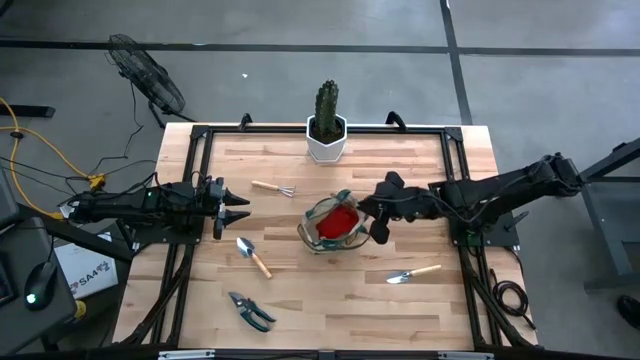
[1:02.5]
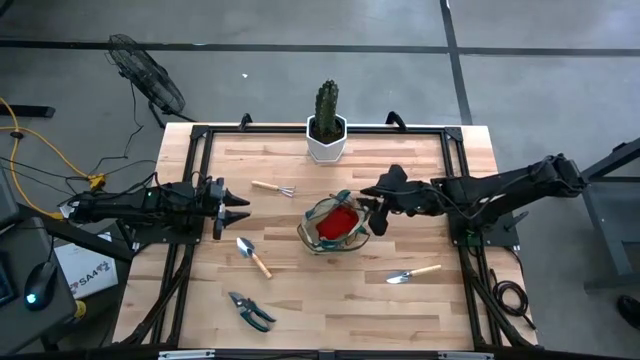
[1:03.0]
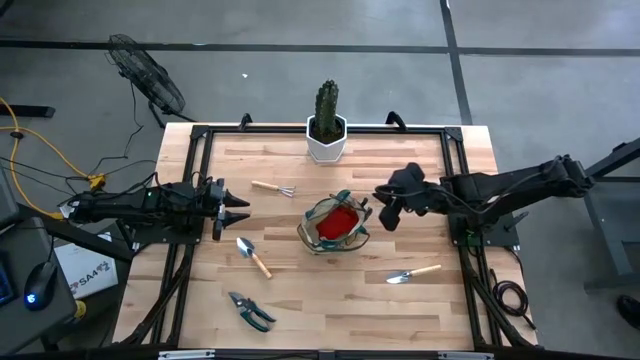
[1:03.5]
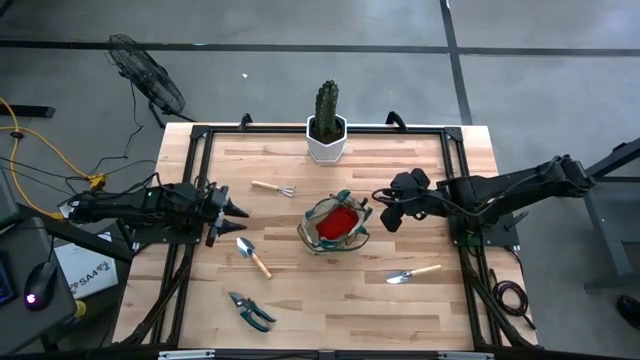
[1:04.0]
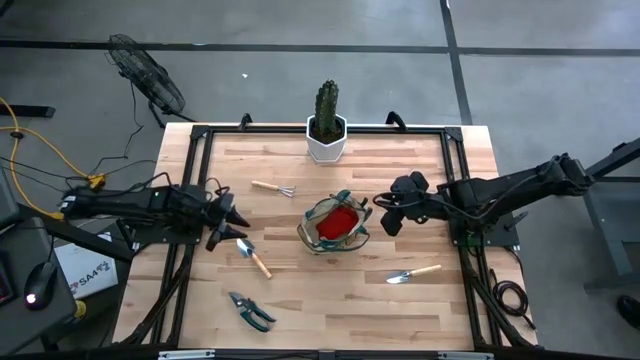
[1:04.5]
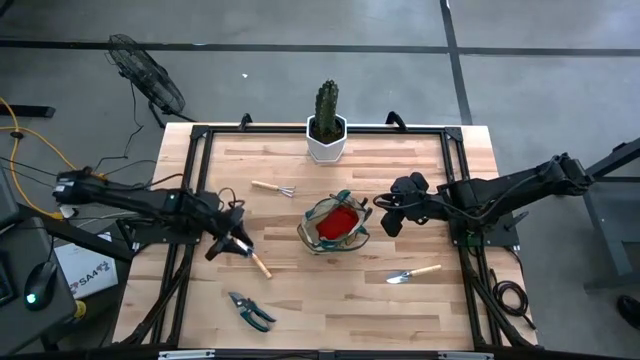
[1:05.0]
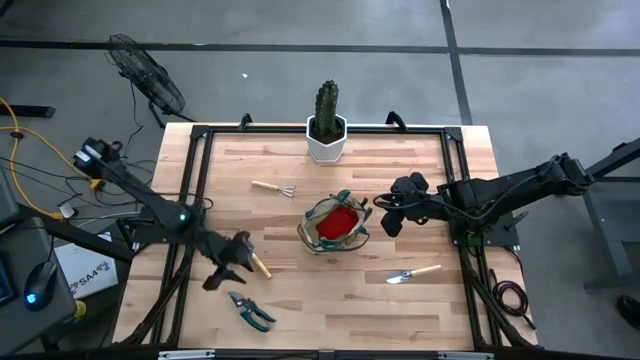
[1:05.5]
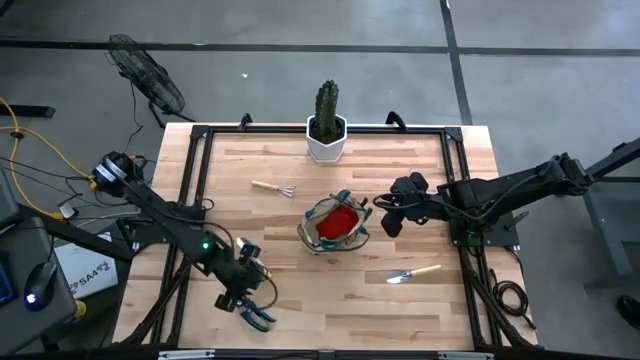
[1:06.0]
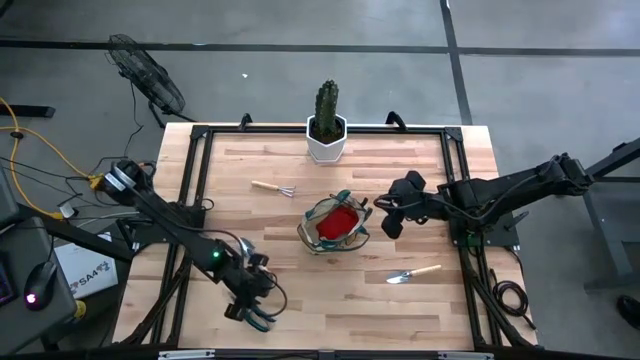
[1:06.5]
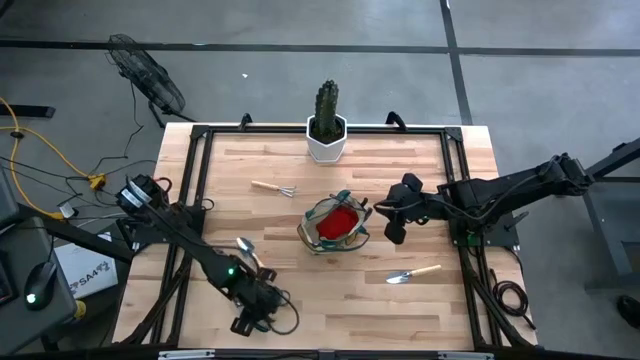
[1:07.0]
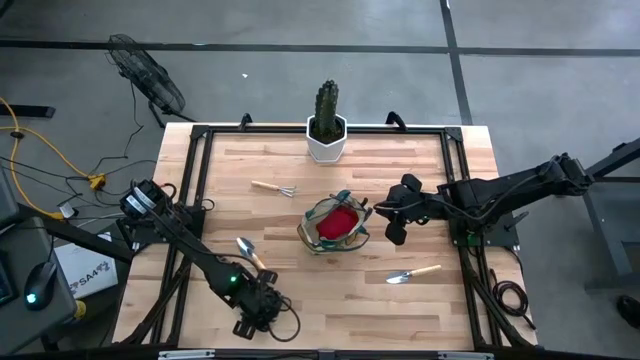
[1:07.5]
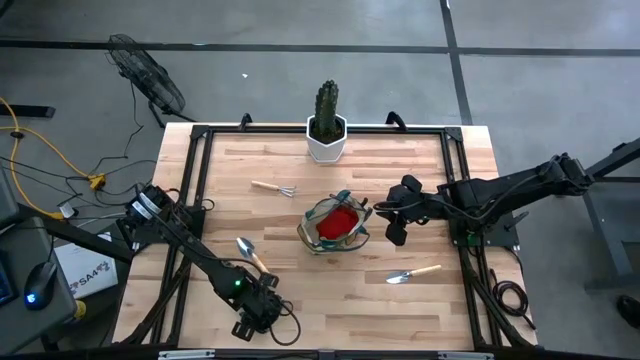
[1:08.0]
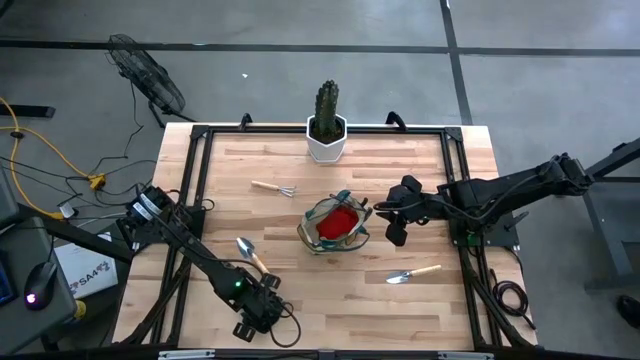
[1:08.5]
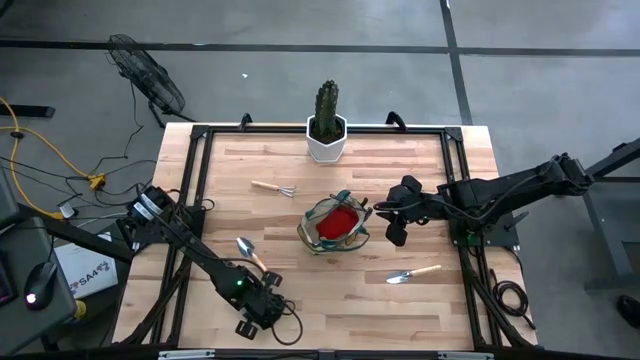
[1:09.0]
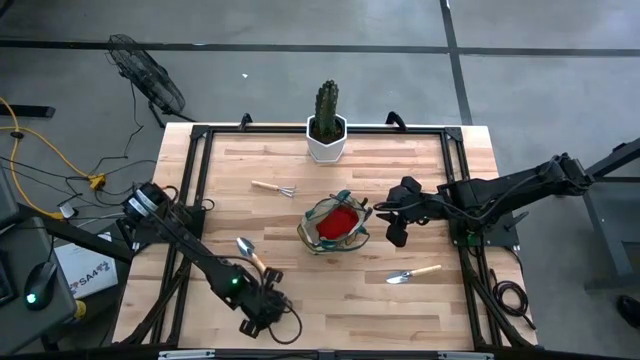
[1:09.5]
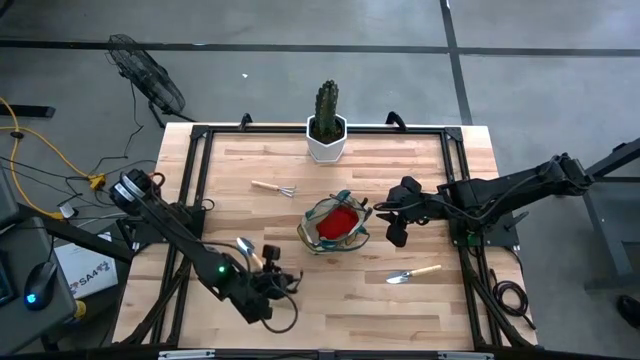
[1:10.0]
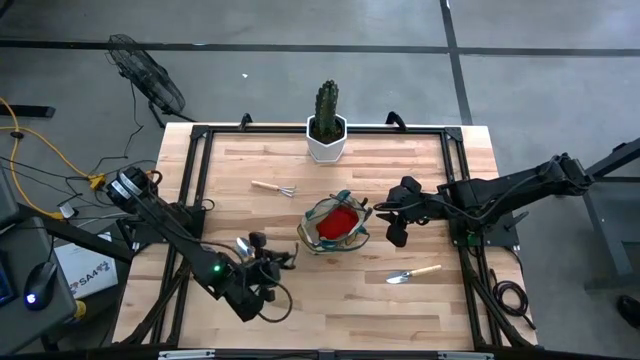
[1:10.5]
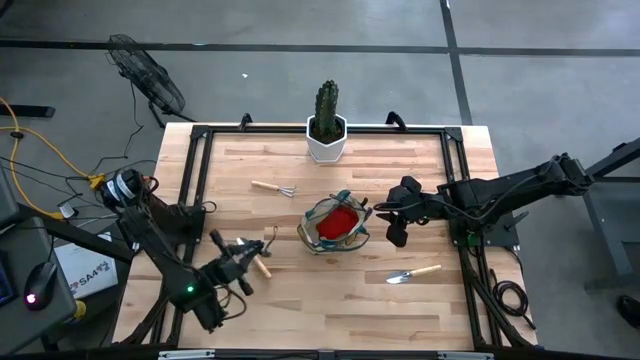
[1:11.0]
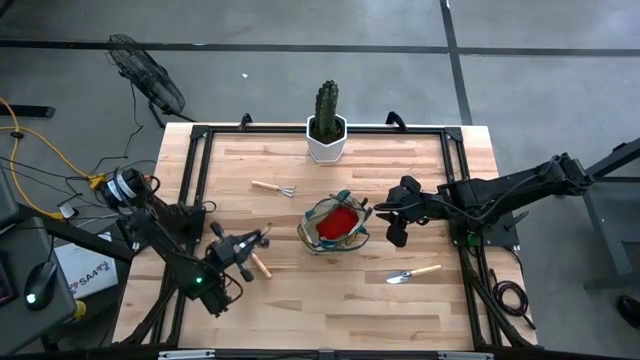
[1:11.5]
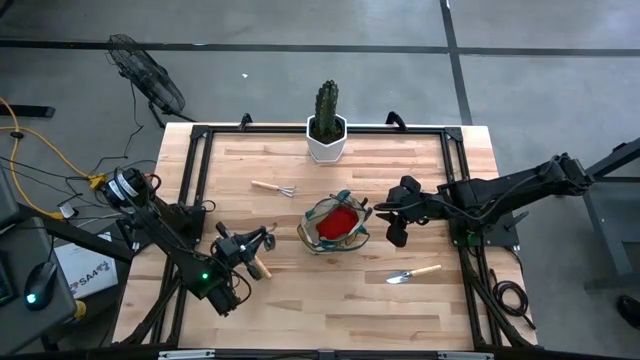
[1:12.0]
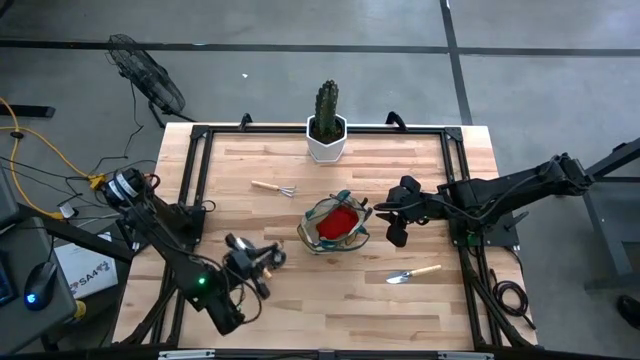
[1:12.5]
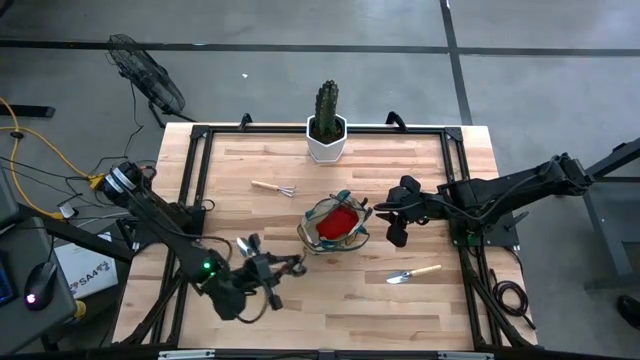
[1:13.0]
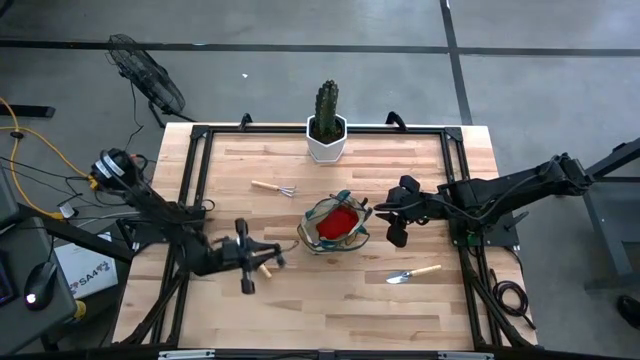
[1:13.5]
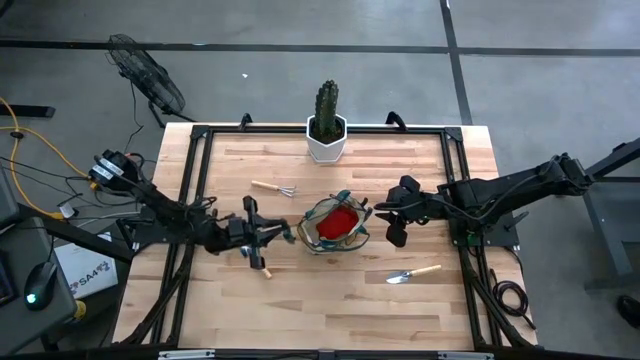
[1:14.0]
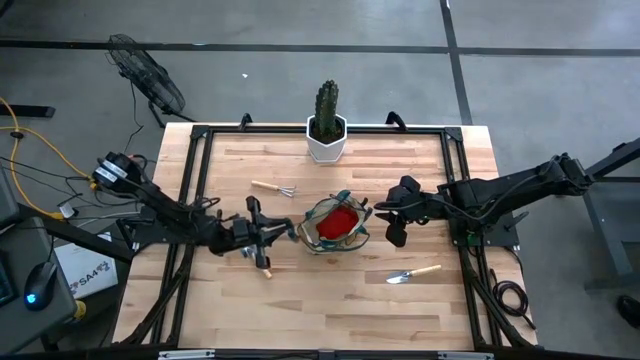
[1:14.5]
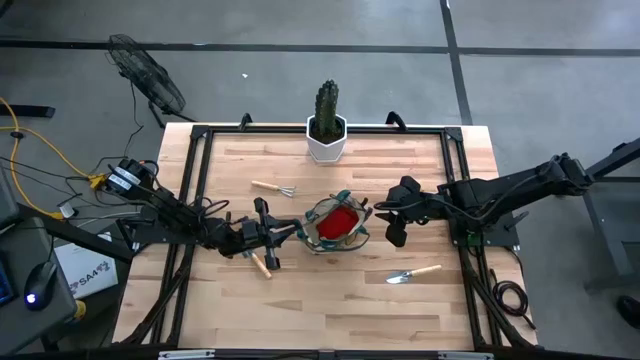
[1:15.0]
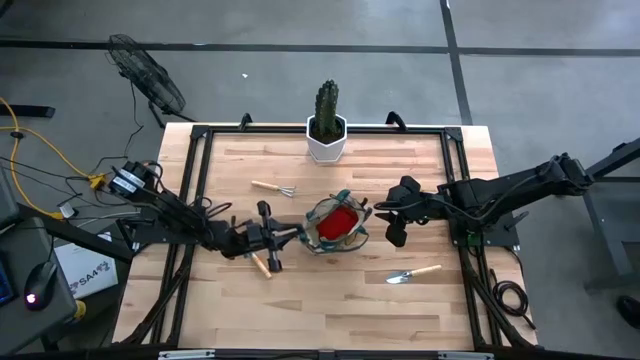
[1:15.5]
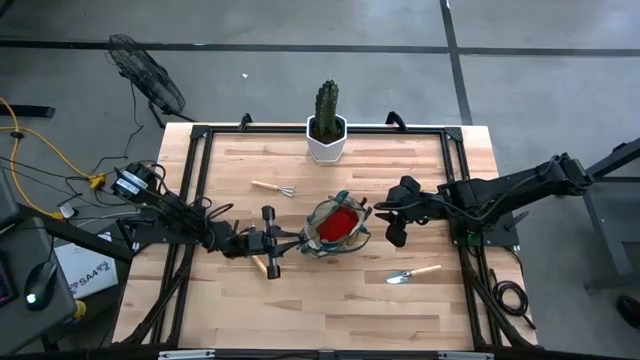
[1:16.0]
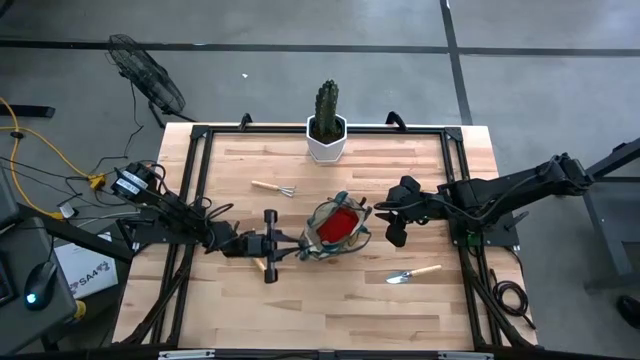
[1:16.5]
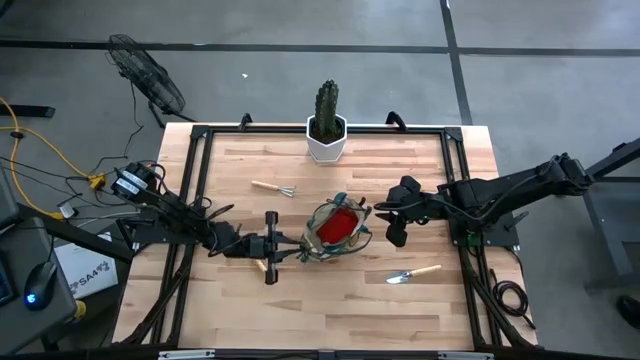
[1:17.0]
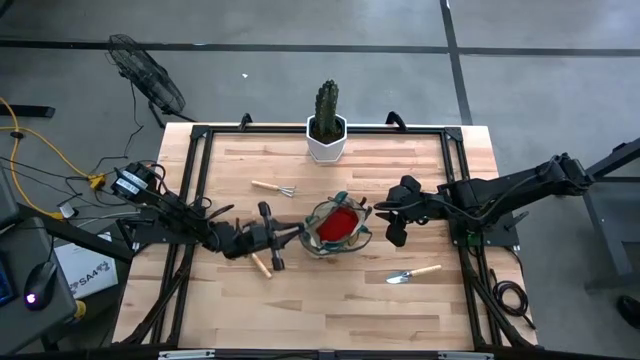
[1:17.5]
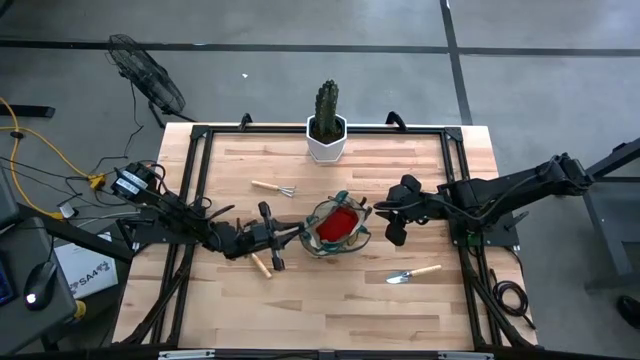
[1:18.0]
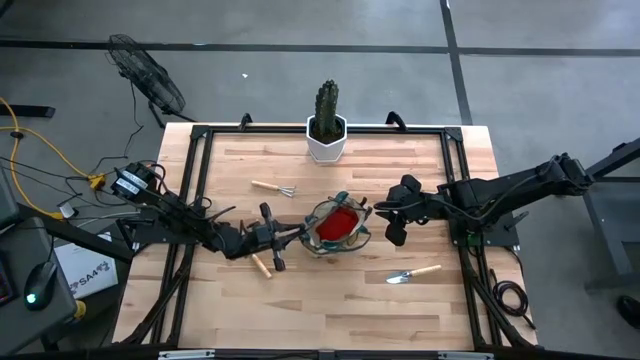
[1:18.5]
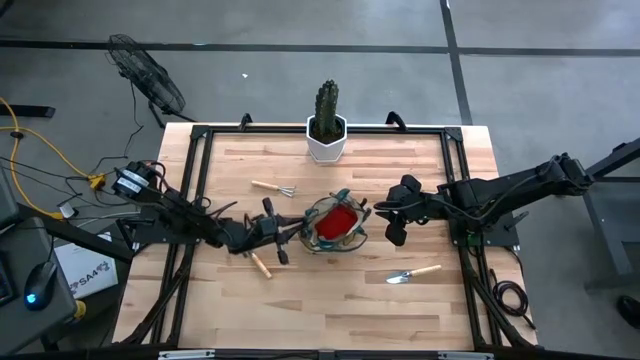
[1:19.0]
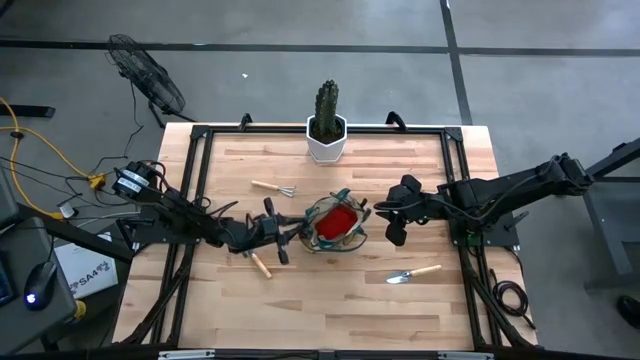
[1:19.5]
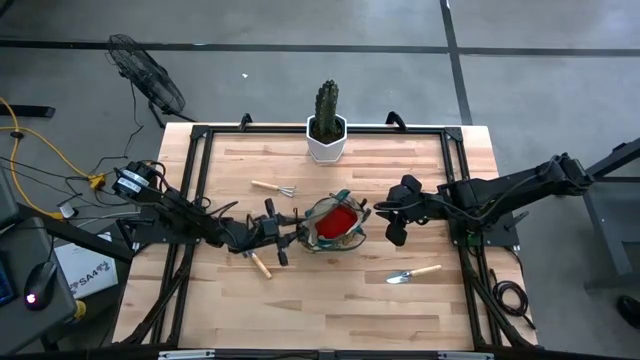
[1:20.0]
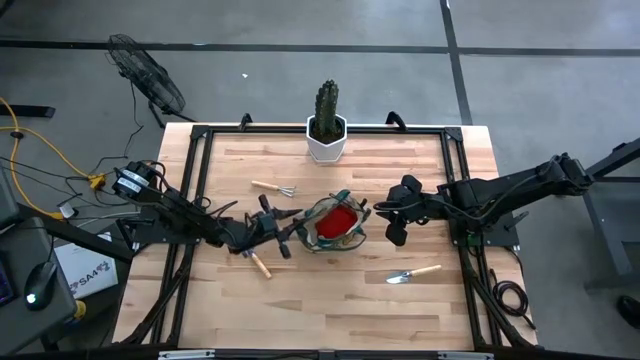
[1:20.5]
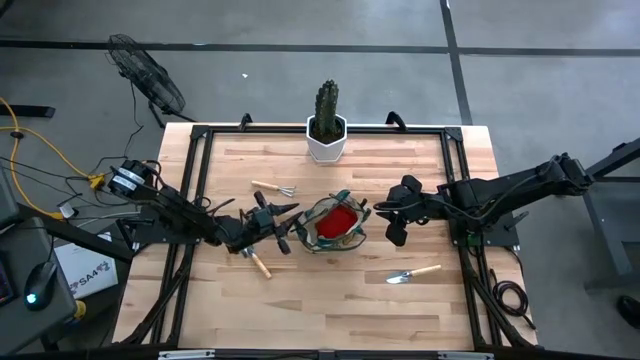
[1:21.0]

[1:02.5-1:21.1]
Task: Pick & Place Garden tools in Gardening bag
Put the green shears into the brown gardening bag

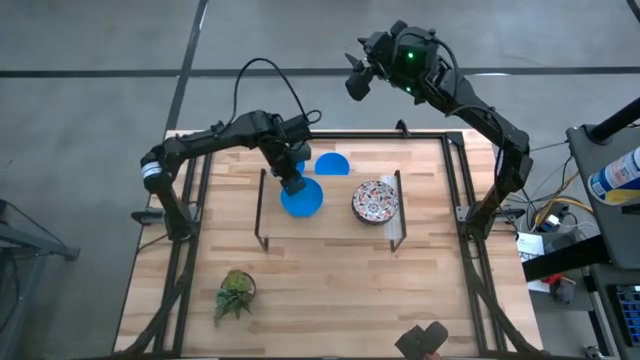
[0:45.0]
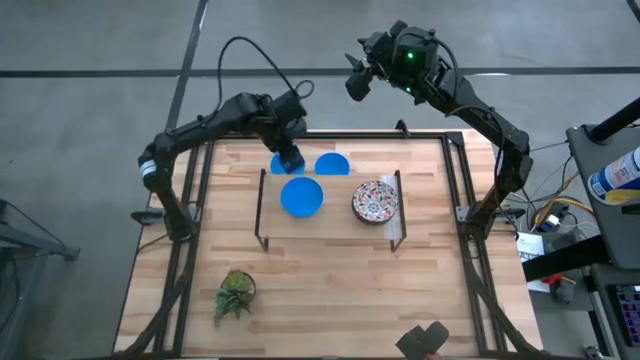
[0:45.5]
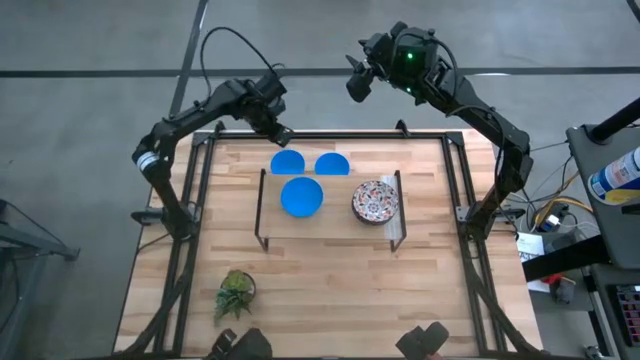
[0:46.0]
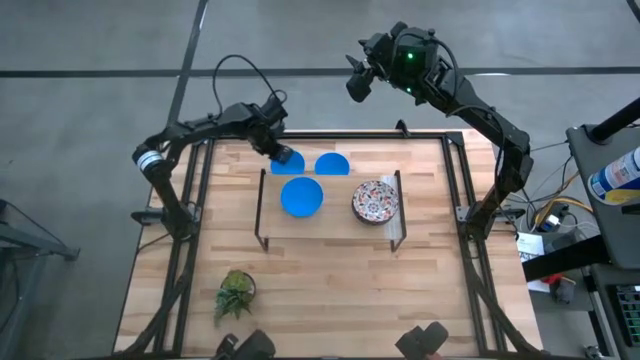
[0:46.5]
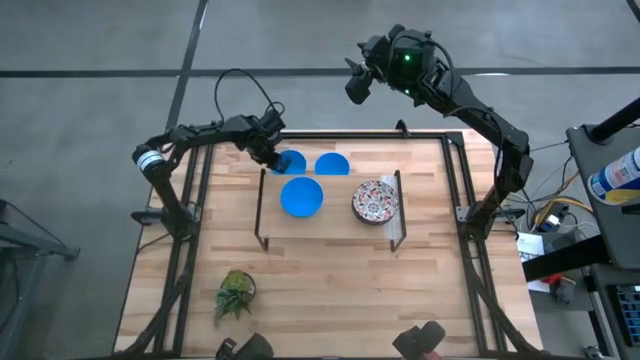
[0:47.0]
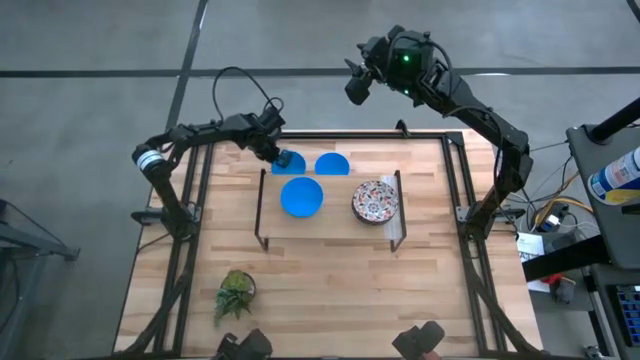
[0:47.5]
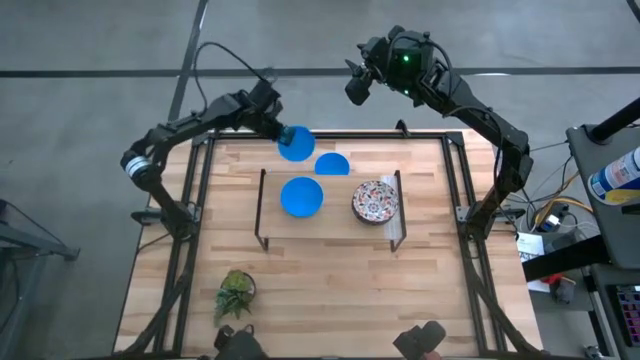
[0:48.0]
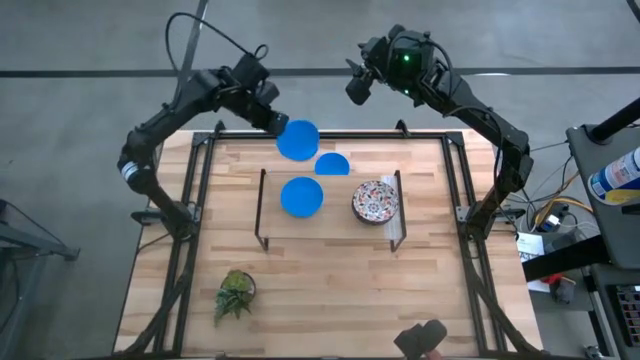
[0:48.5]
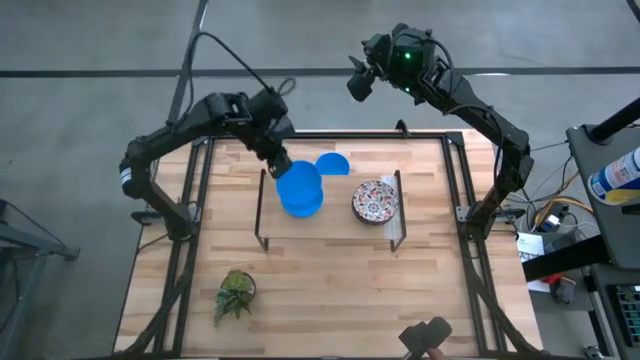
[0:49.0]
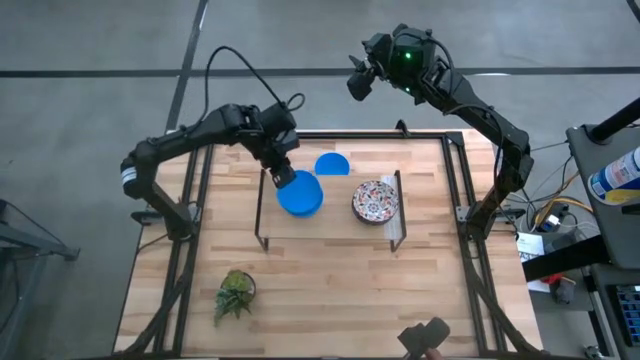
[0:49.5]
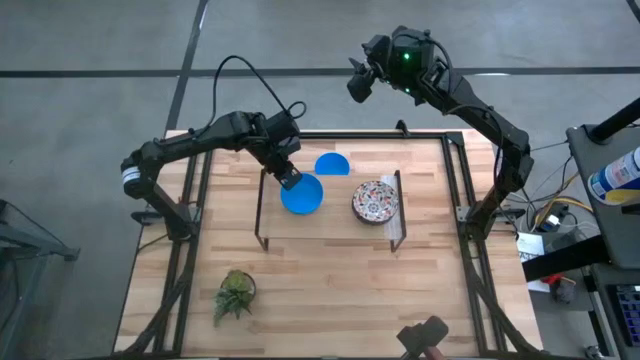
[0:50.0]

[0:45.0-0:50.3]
Task: Pick & Place Mini bowls
Stack the left blue bowl on top of the blue bowl on the shelf
